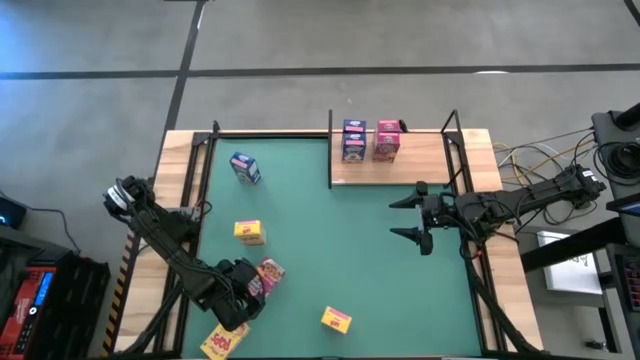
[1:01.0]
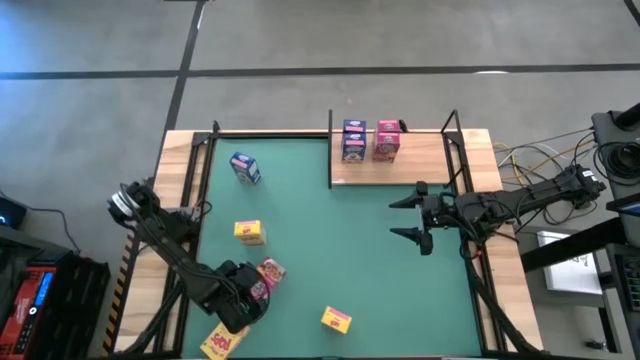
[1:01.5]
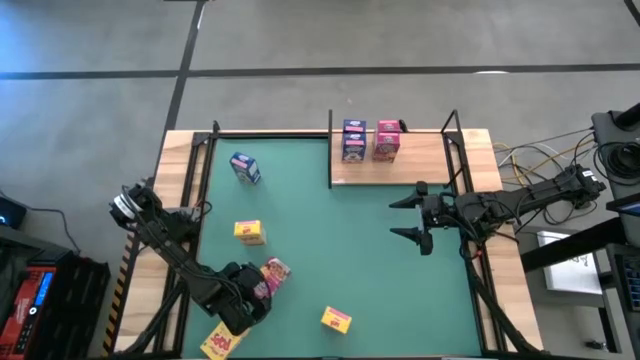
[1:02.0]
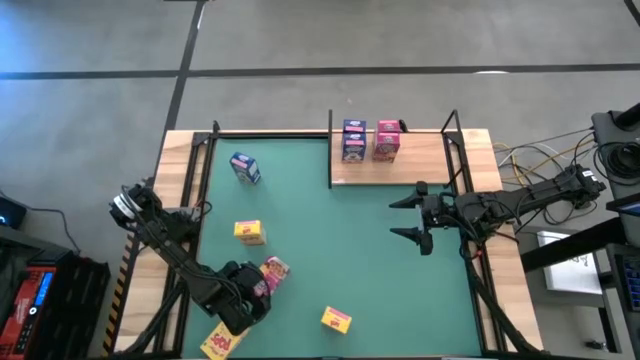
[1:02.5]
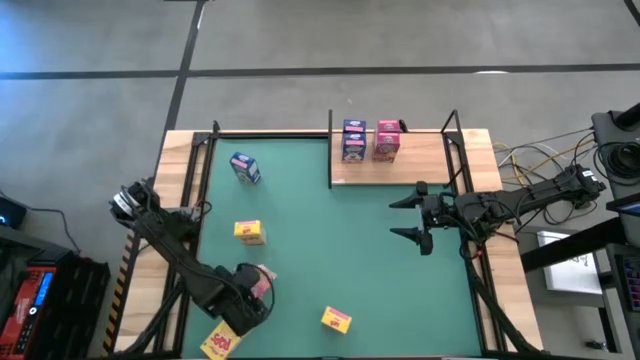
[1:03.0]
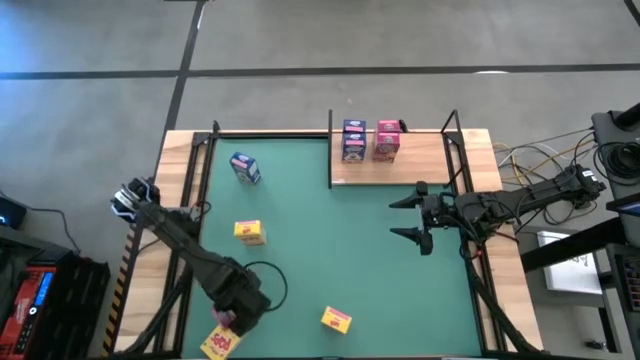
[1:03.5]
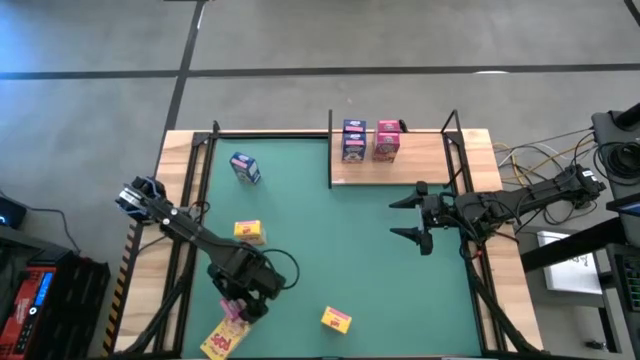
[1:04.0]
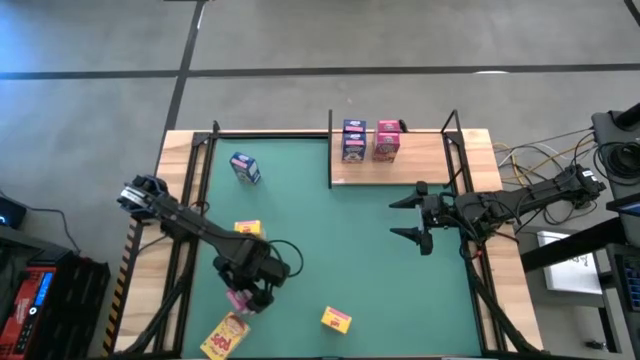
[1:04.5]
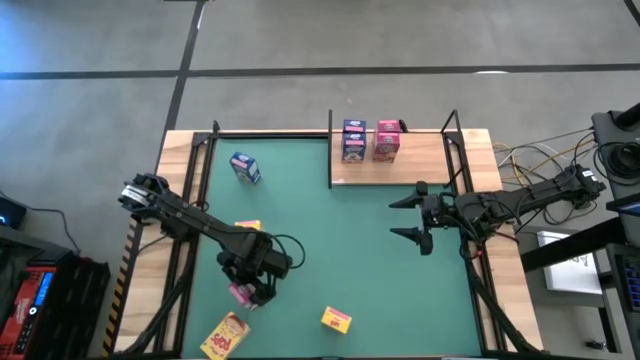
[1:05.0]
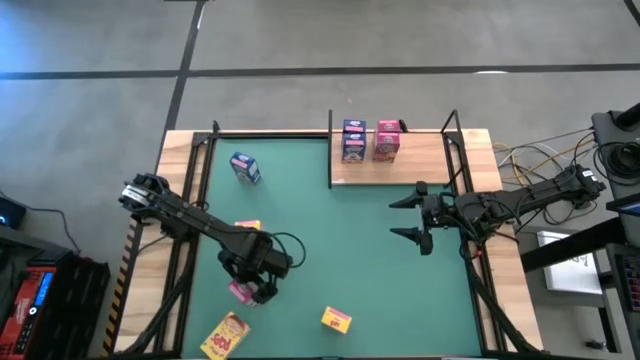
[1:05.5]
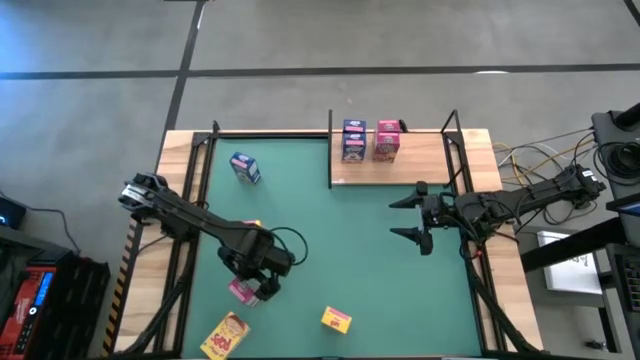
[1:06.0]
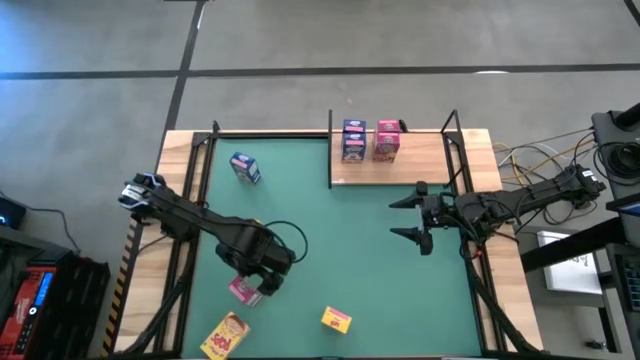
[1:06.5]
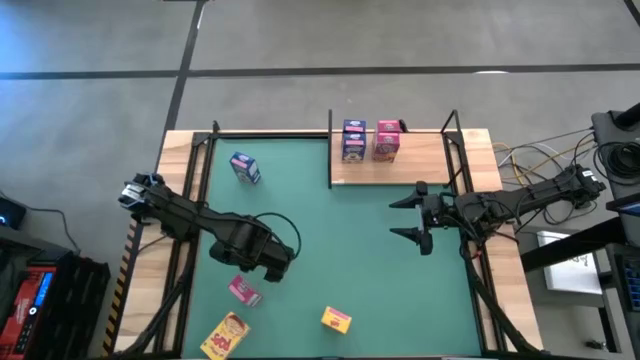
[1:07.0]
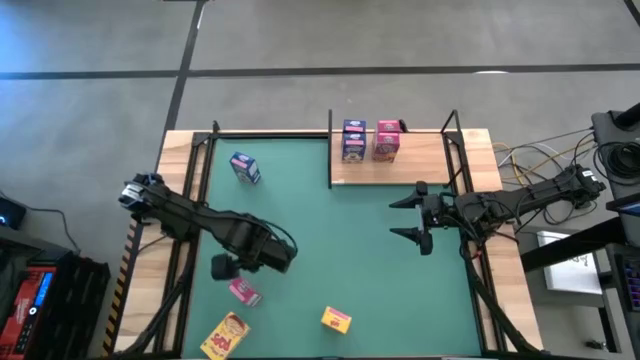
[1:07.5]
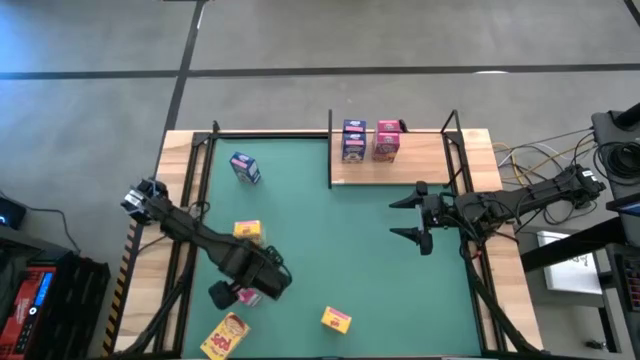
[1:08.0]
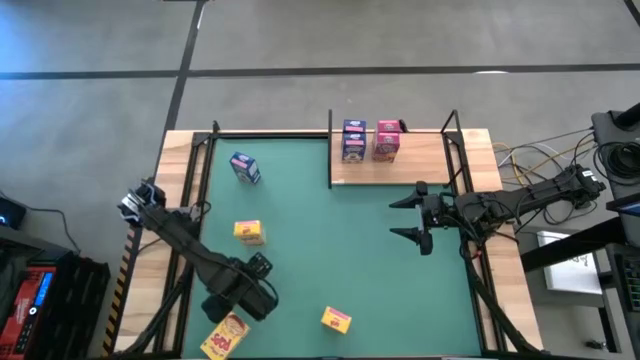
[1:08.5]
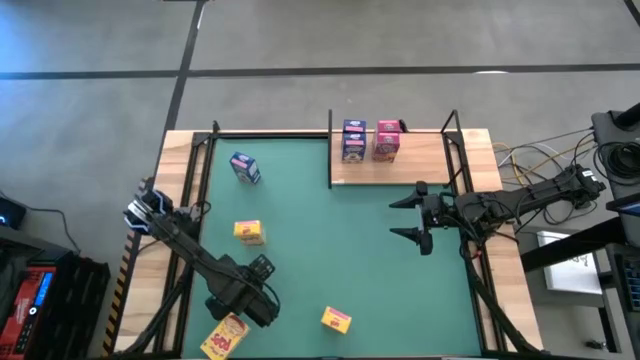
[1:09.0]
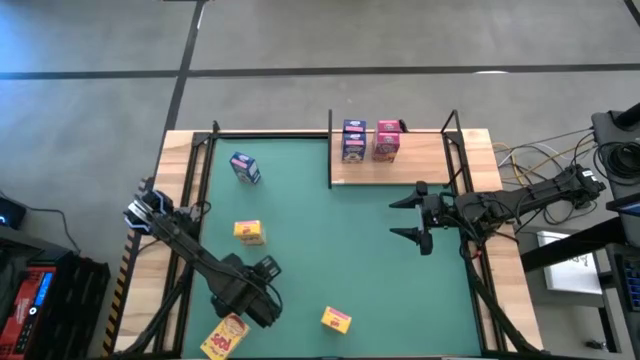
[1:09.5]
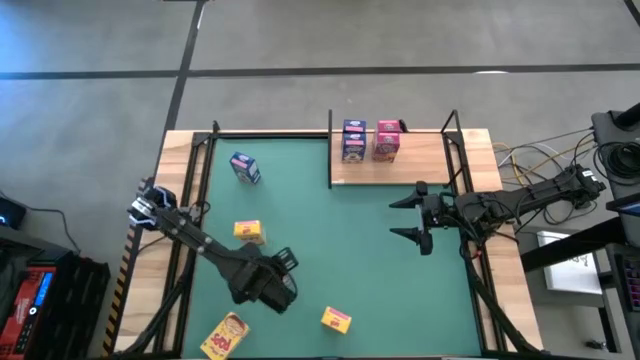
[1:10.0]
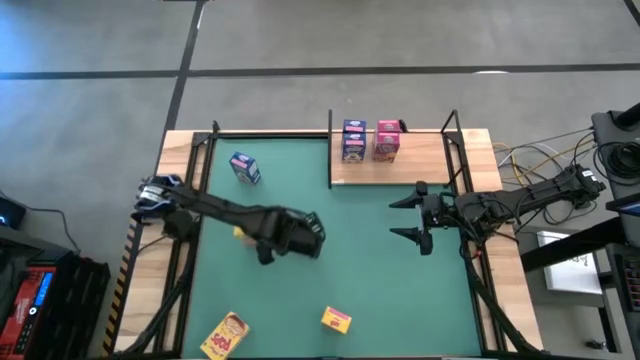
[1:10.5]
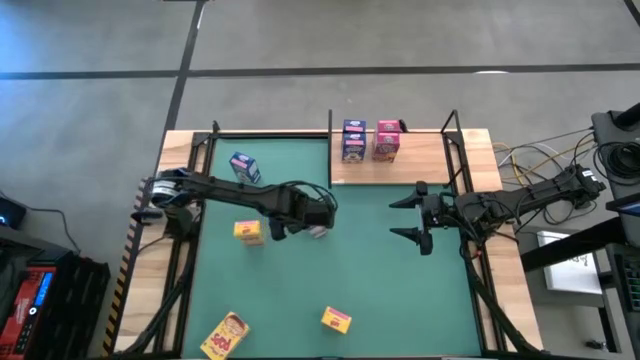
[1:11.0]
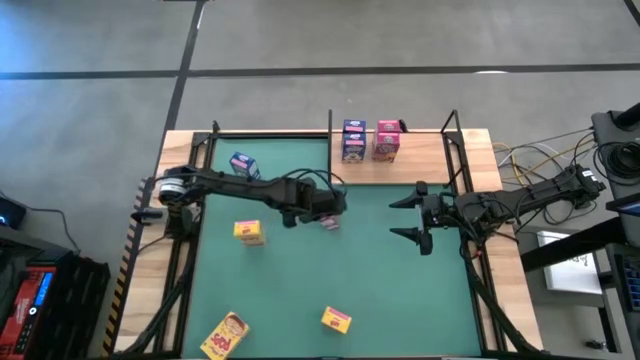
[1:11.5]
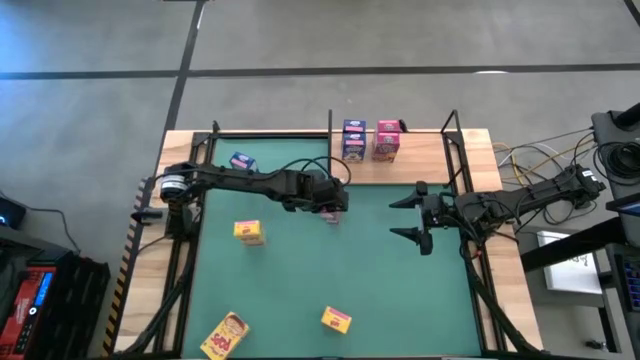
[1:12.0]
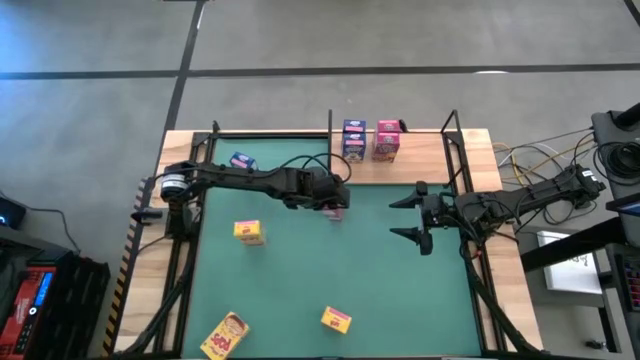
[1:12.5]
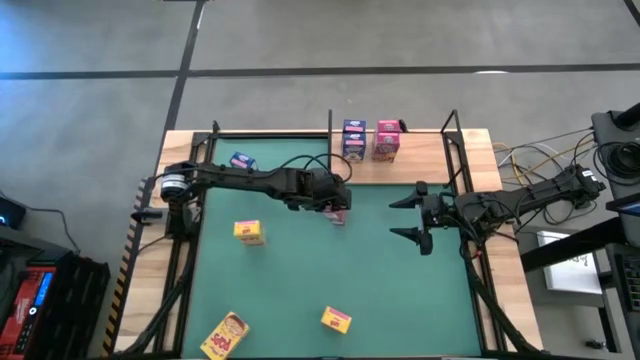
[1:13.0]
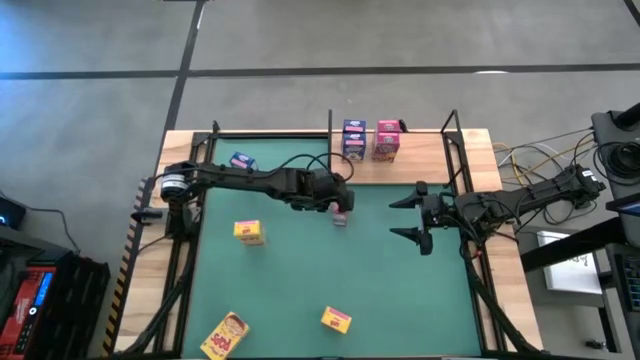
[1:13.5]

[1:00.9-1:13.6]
Task: Stack cereal on shelf
Put the pink cereal box on the shelf

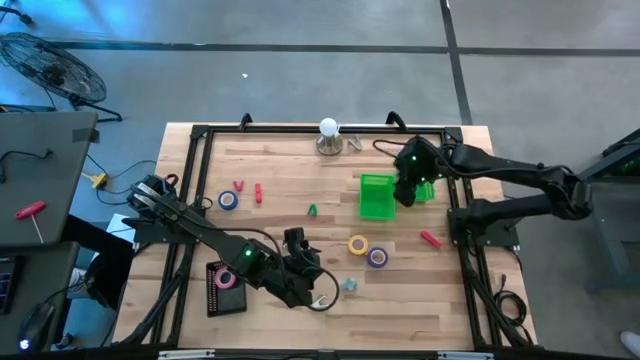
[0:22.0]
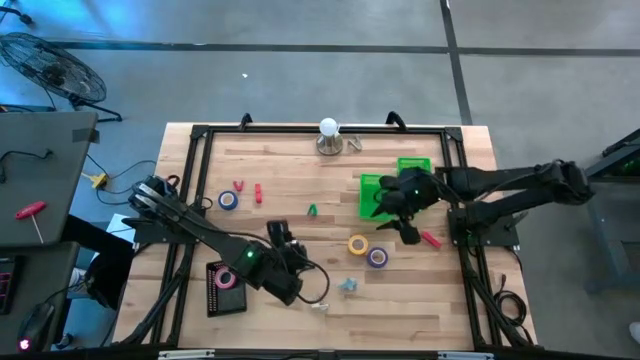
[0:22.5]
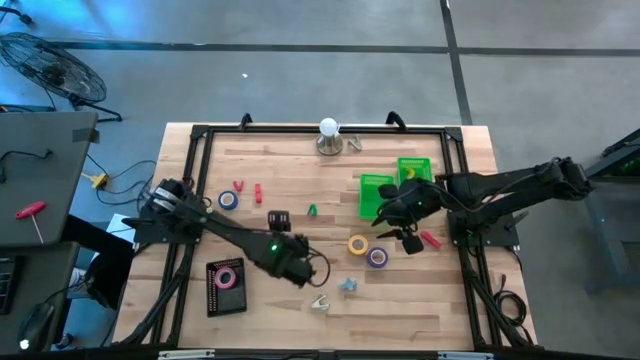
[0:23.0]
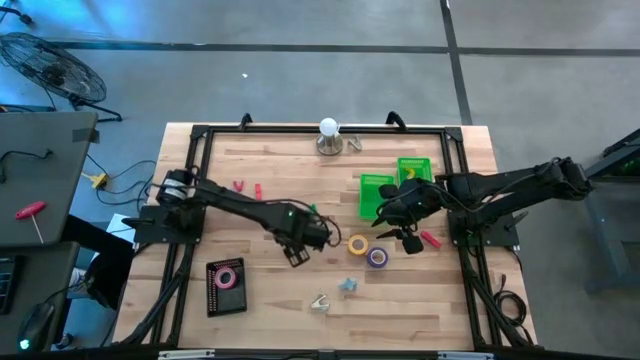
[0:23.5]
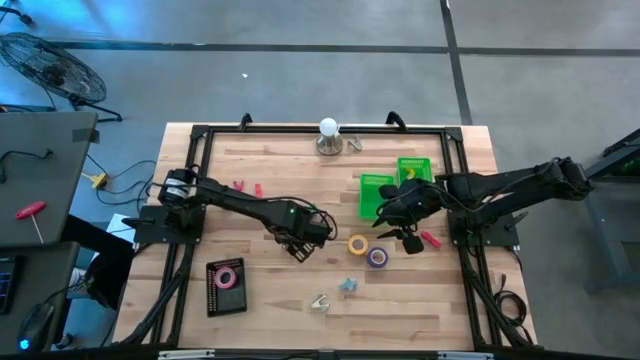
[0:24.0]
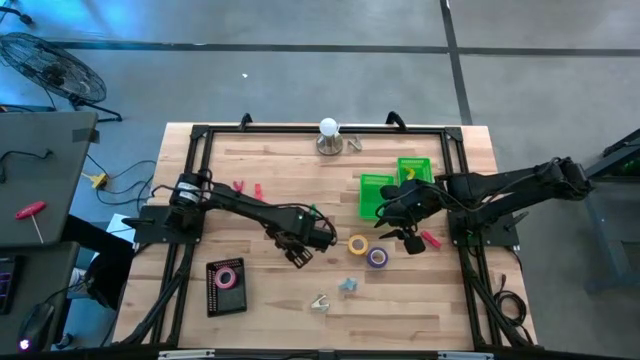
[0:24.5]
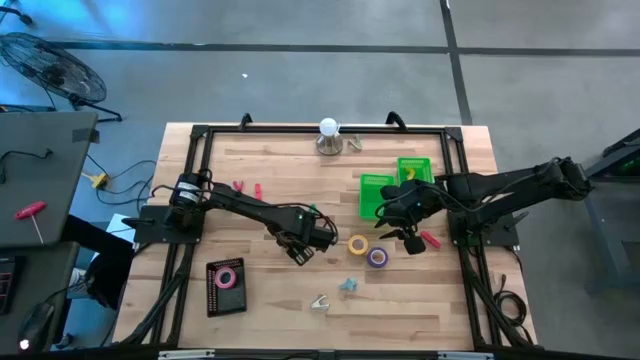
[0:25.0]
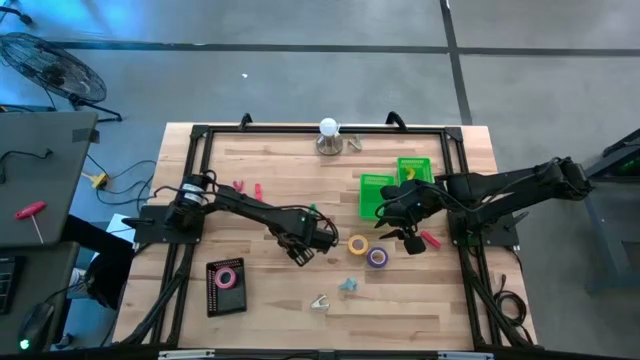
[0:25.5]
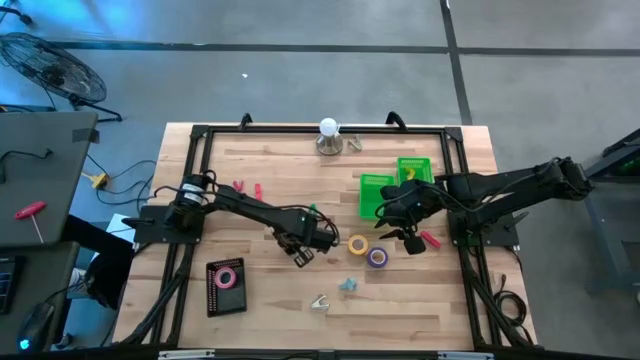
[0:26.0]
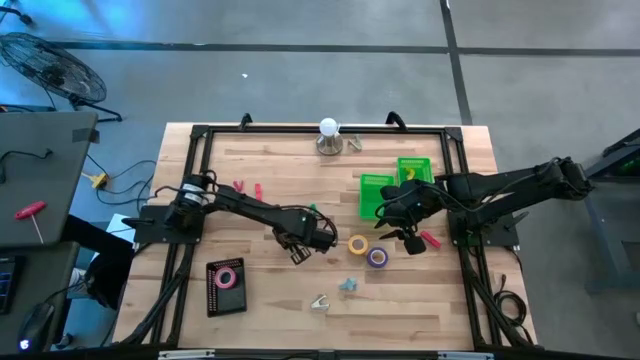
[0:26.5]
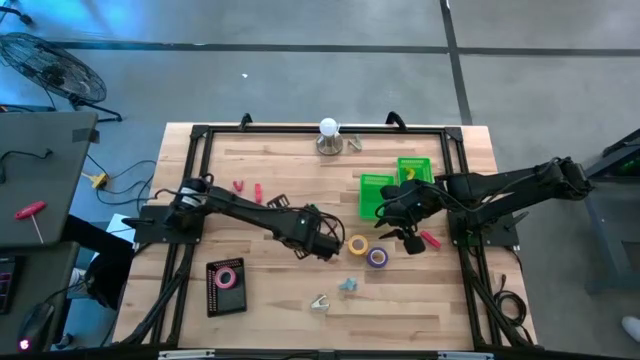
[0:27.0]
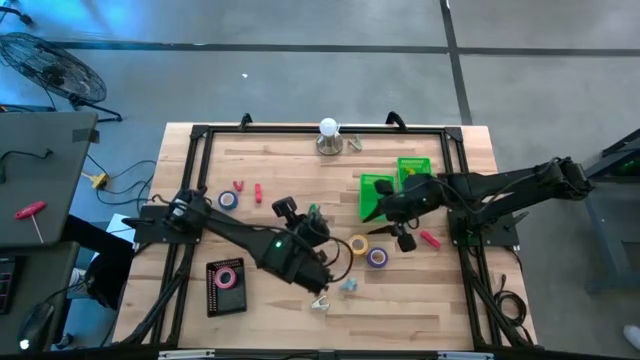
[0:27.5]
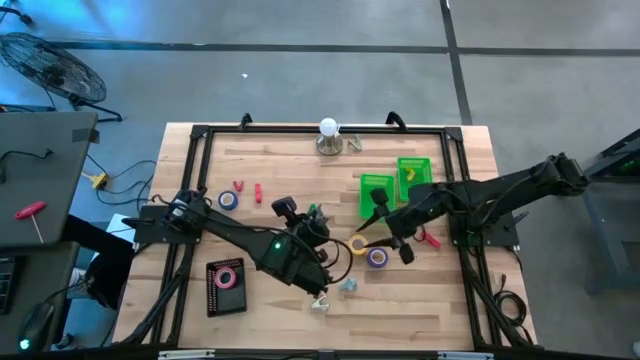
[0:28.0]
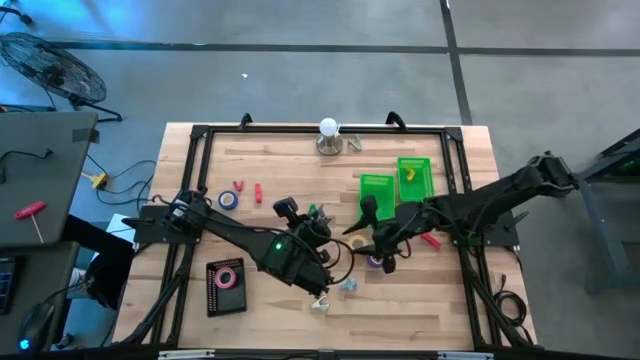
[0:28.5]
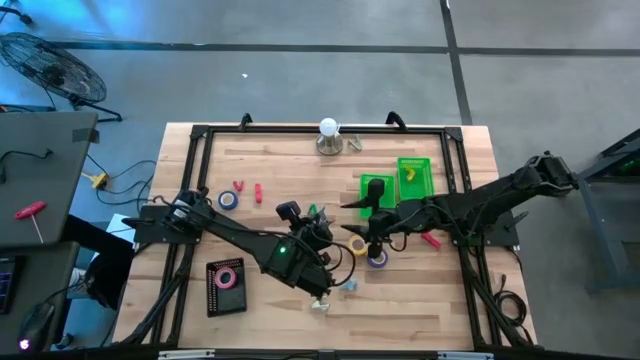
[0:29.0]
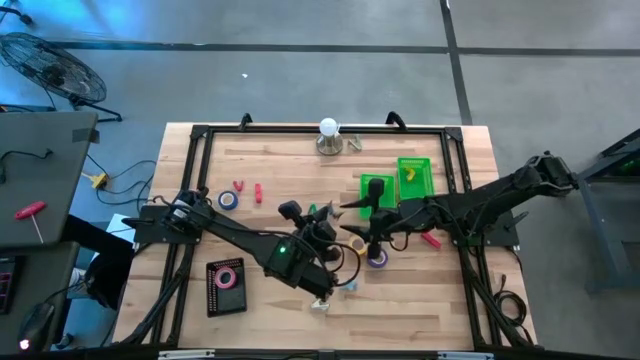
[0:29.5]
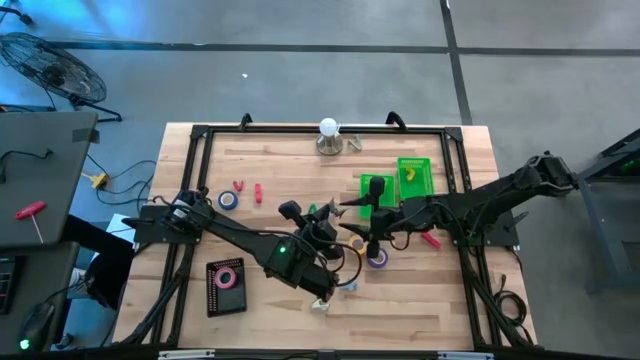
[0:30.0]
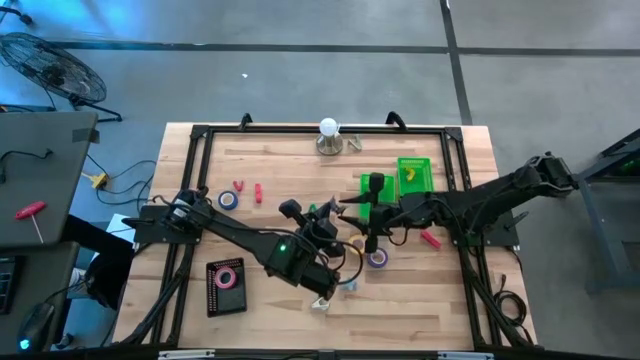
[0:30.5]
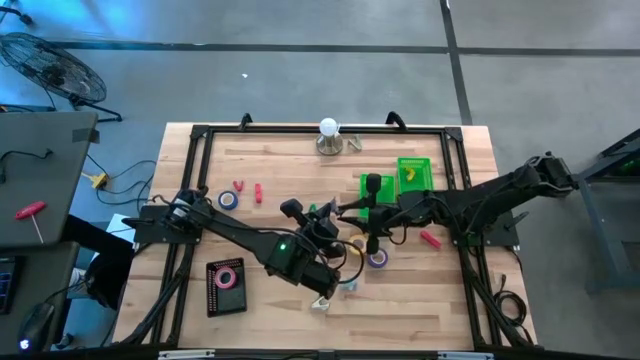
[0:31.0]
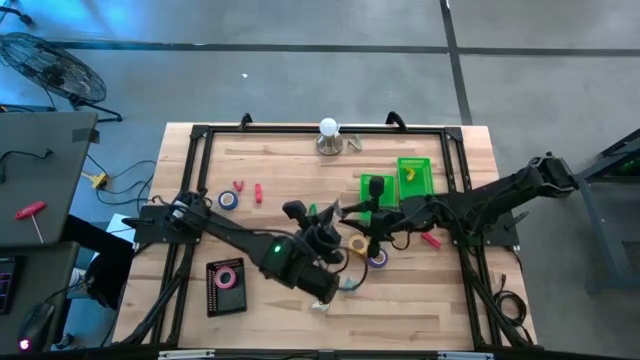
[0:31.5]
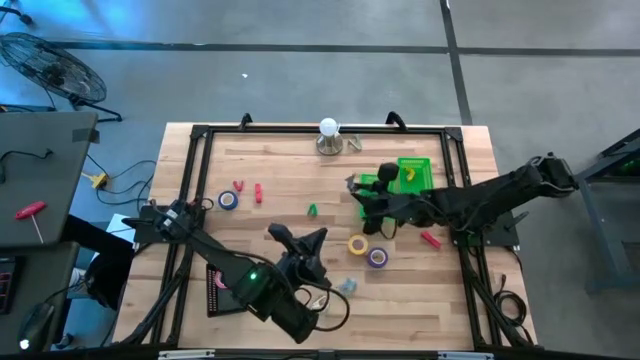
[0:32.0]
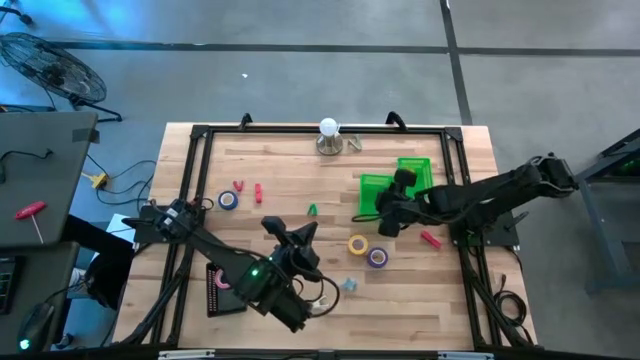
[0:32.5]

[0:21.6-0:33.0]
Task: Pick and place Stapler, Stapler remover, tape
Put the black staple remover into the left green basket
